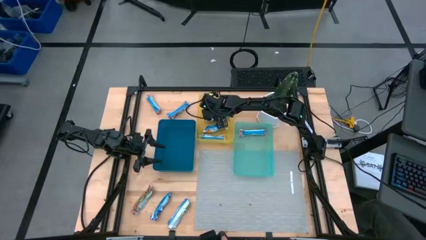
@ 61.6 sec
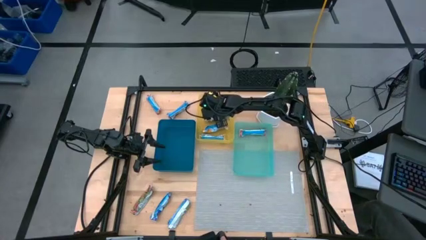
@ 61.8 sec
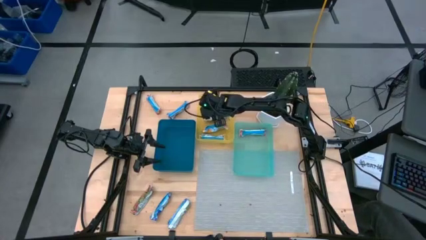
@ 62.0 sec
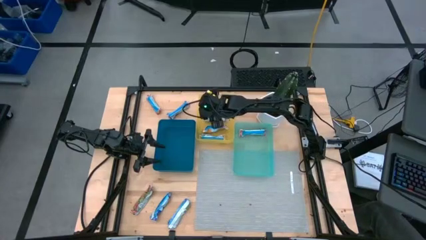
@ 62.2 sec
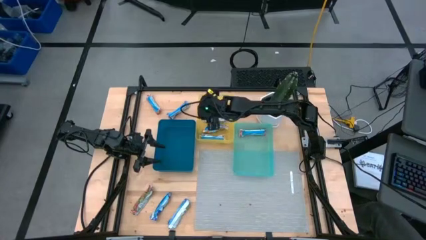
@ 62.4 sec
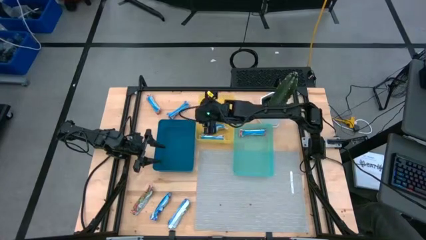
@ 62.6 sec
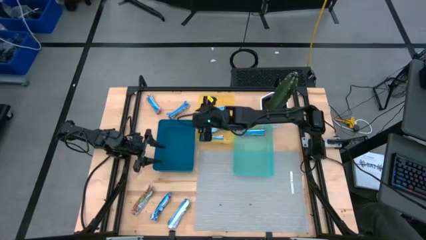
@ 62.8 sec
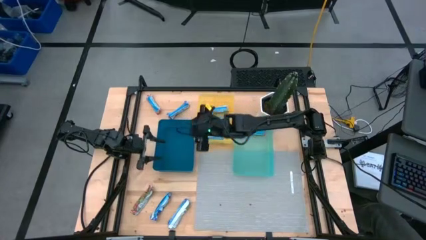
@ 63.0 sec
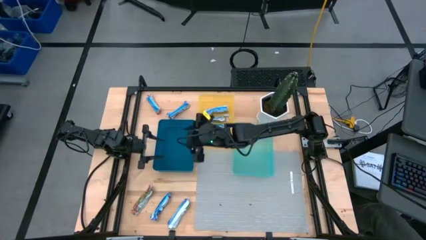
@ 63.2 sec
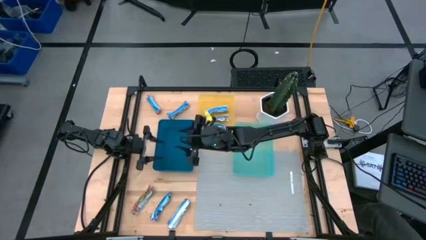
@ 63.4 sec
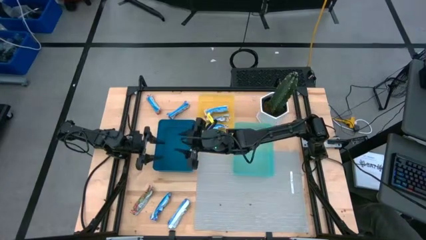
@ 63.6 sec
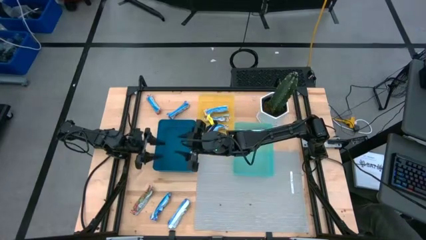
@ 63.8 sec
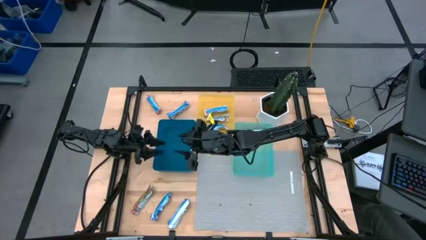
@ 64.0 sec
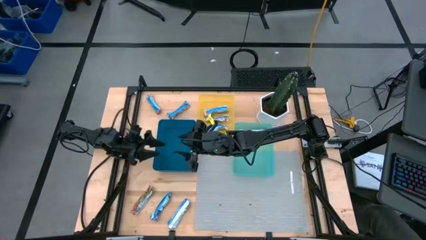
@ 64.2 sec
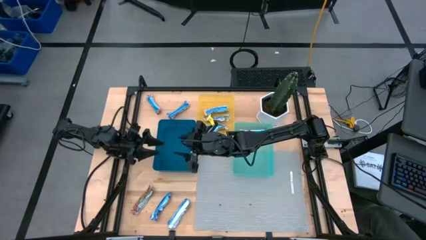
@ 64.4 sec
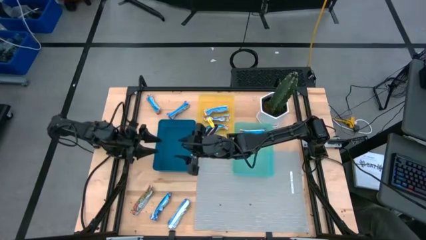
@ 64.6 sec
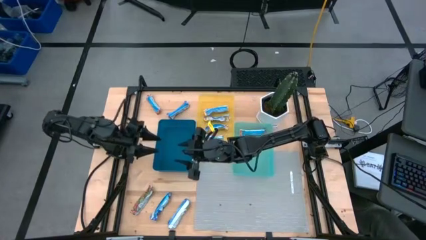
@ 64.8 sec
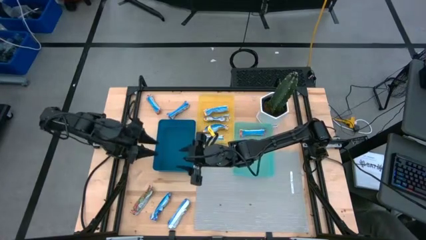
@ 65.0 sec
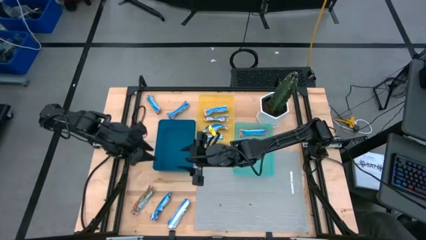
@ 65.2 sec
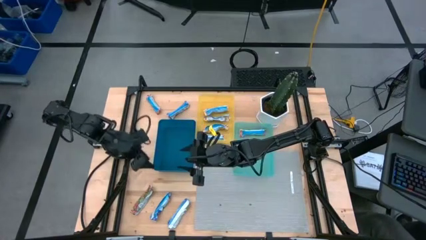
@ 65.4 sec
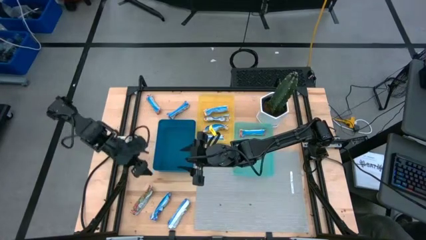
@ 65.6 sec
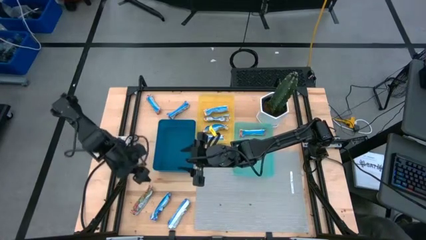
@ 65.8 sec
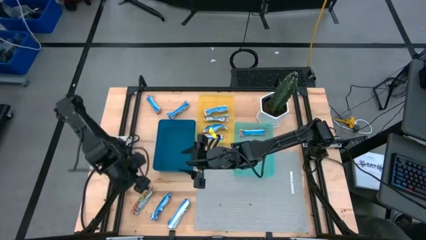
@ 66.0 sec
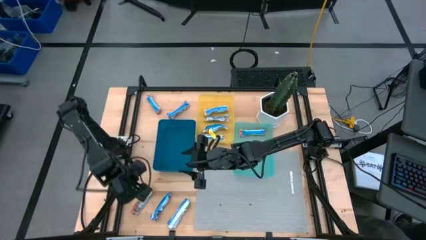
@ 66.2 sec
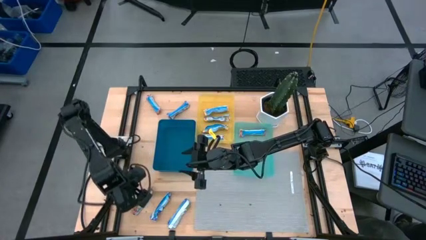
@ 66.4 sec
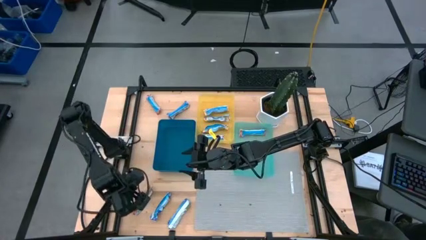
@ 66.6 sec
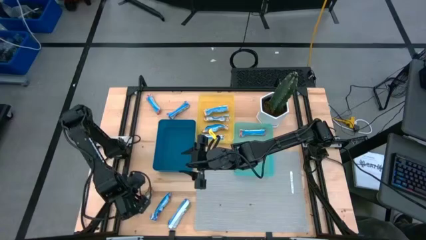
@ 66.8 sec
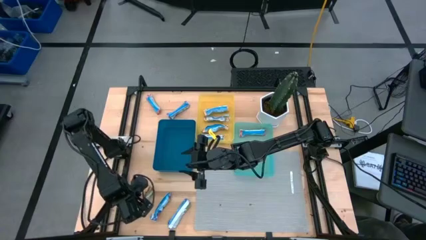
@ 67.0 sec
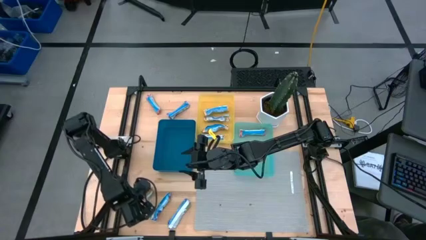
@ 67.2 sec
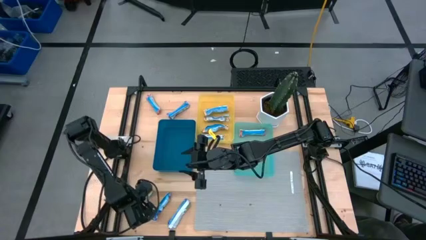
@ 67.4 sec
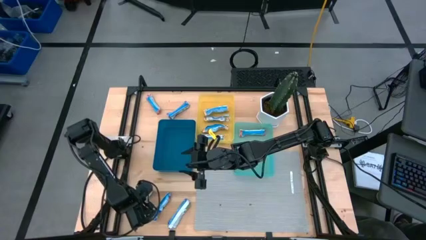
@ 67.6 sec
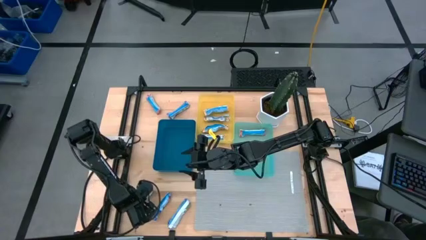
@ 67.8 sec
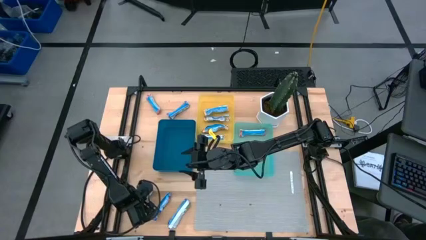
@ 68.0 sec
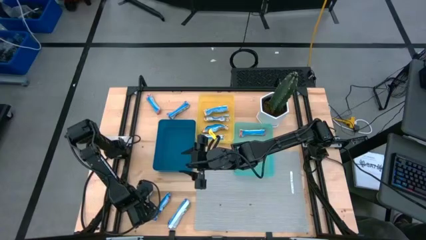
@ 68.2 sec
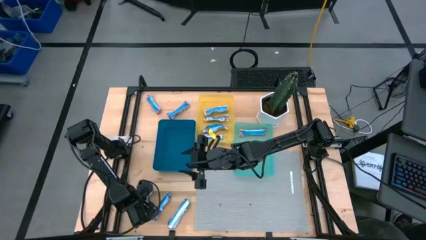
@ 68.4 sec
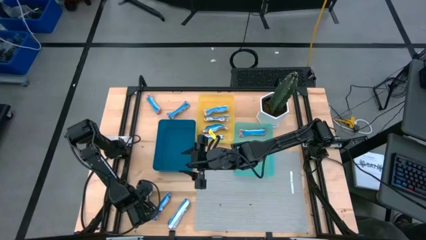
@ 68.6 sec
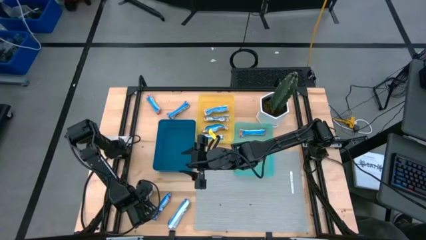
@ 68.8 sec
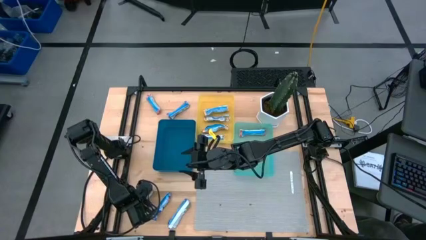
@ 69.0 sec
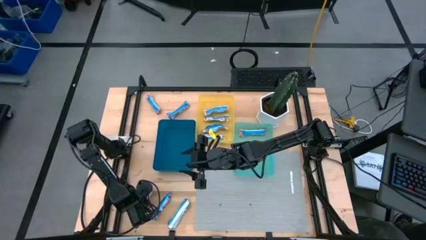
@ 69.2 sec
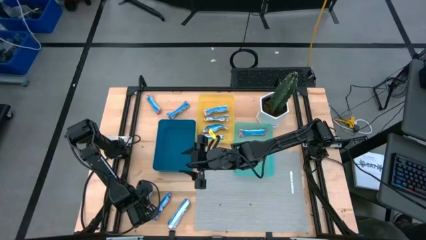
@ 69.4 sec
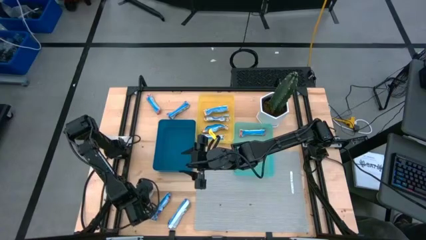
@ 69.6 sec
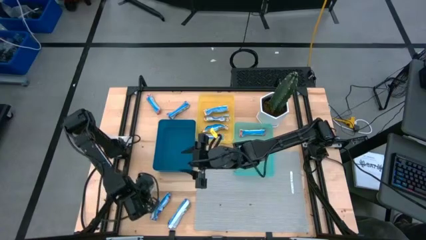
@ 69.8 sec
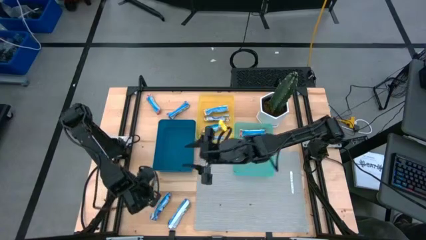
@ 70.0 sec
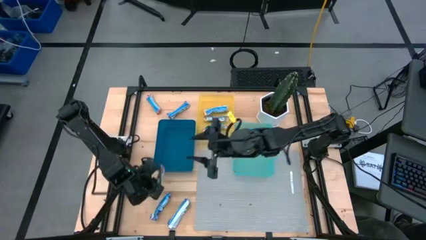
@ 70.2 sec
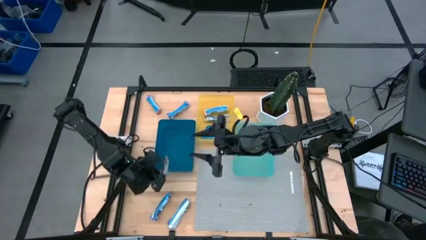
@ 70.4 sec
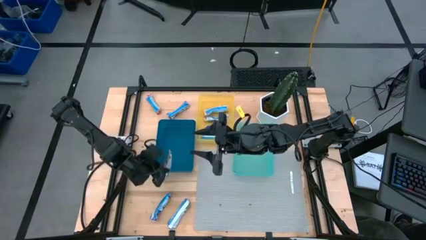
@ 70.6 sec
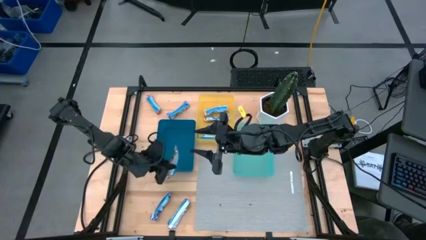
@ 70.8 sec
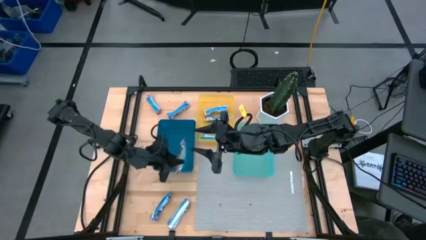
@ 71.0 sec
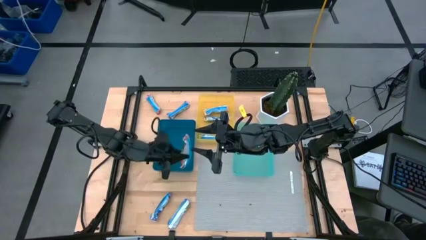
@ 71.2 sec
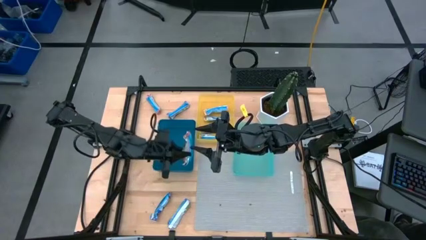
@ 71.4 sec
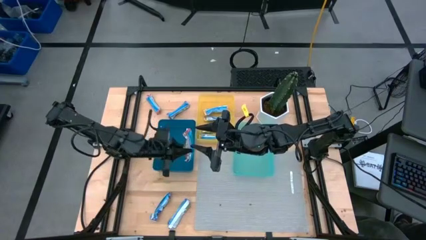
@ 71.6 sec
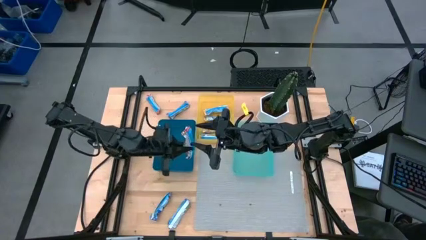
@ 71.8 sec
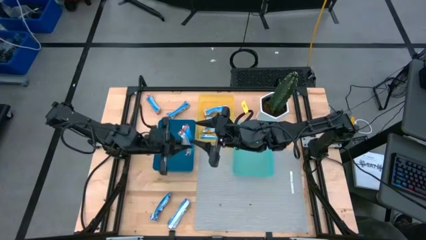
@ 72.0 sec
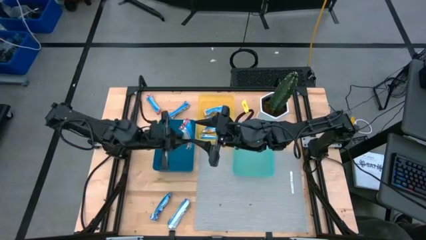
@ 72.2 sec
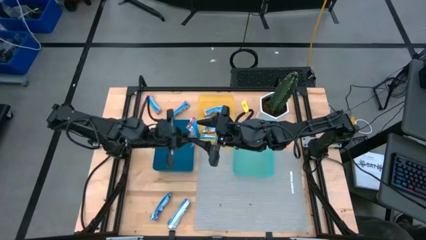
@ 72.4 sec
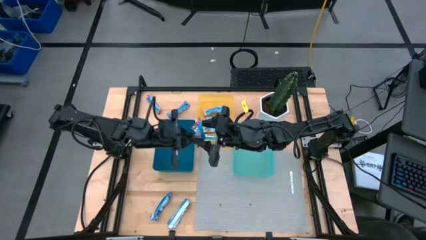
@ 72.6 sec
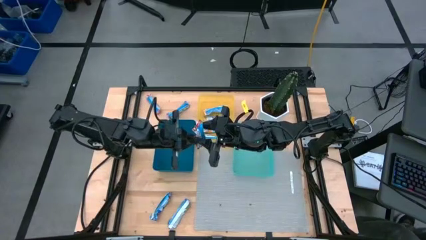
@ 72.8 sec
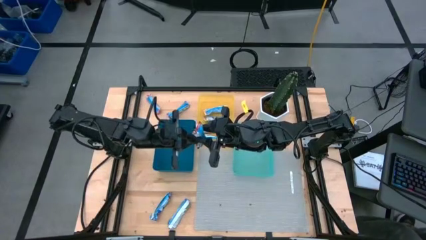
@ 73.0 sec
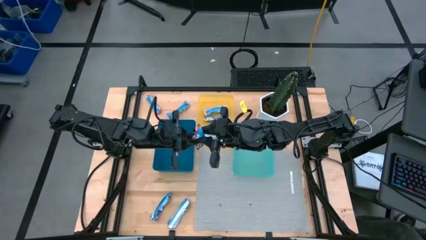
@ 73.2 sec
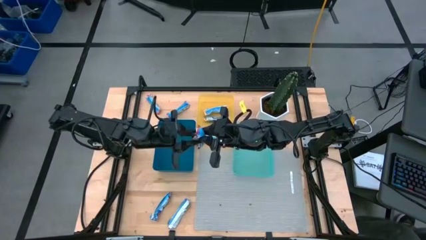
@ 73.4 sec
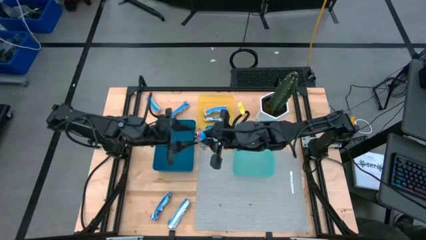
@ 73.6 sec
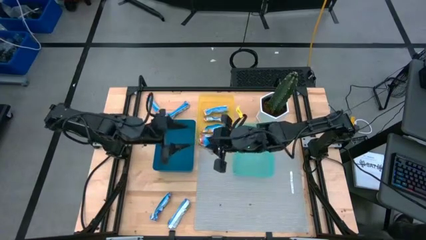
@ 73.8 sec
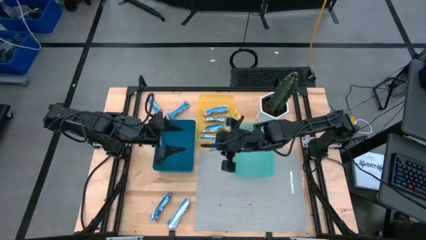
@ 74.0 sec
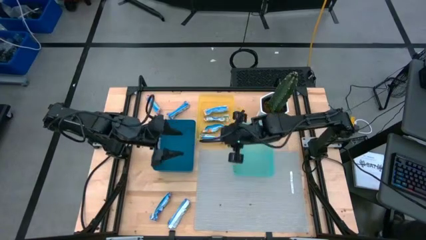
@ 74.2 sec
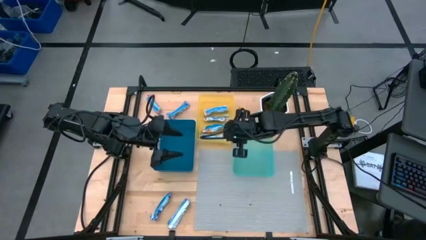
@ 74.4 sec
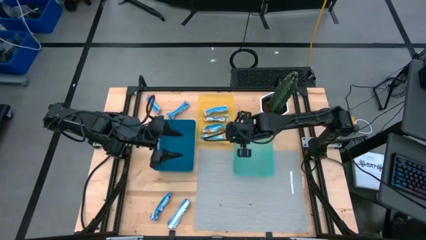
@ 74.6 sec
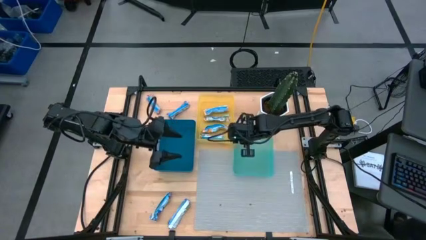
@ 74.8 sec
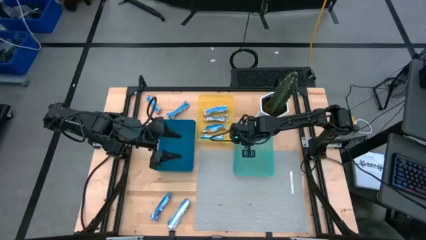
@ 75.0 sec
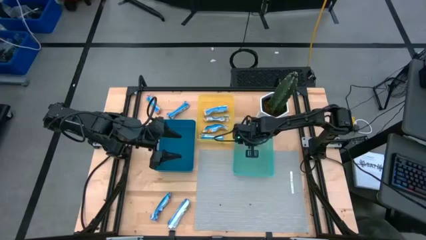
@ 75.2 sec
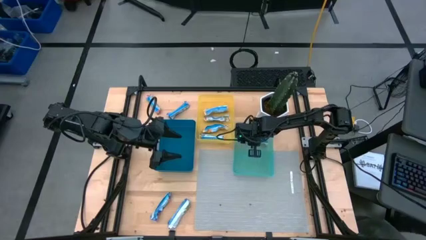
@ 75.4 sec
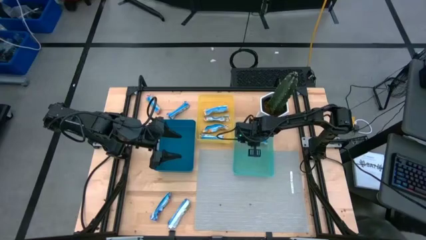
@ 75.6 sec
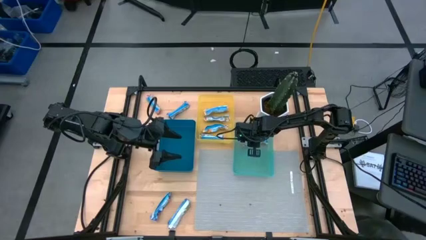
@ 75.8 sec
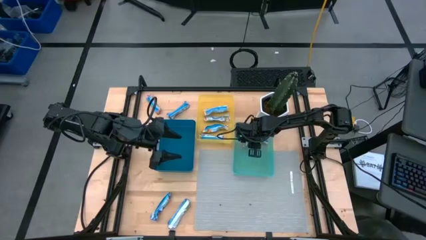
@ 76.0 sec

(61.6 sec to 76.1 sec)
Task: Pick and place Granola Bars by type
Put the red granola bar into the green bin

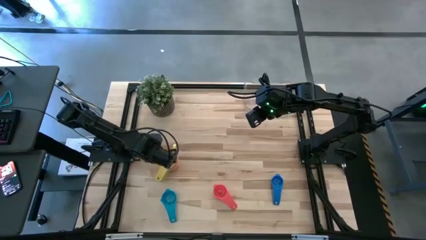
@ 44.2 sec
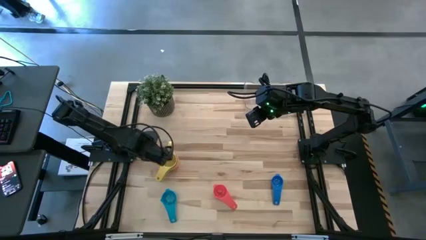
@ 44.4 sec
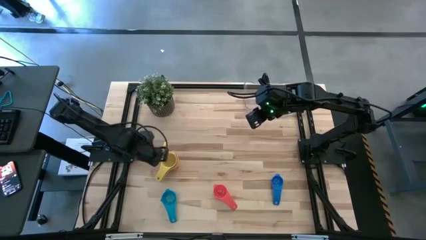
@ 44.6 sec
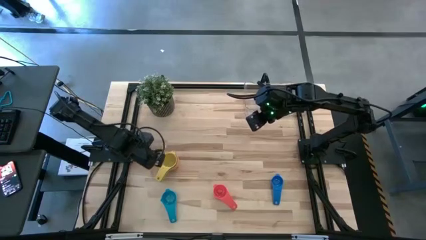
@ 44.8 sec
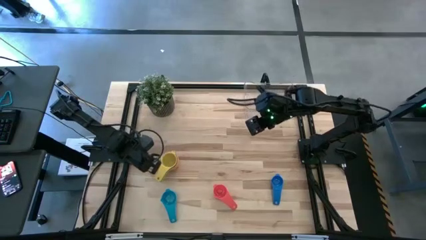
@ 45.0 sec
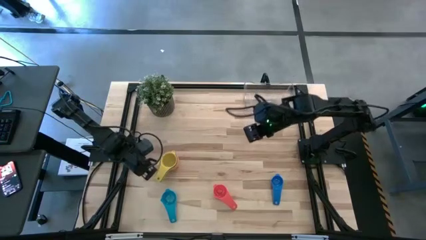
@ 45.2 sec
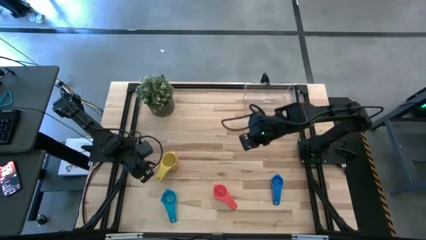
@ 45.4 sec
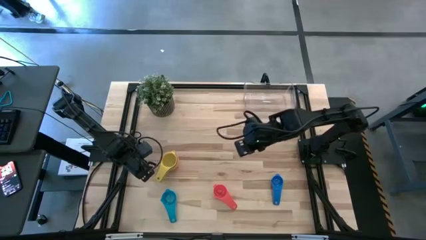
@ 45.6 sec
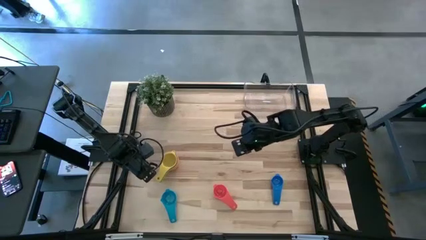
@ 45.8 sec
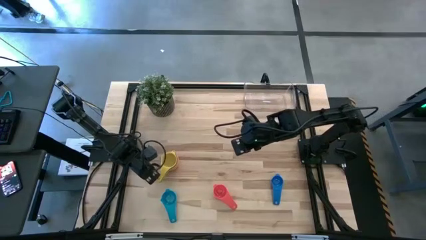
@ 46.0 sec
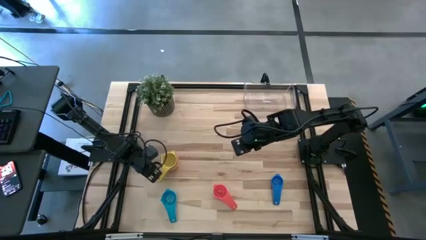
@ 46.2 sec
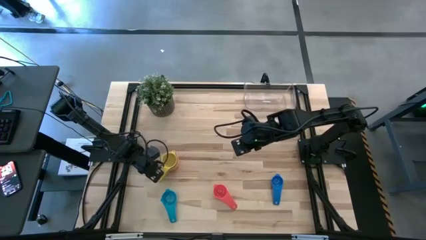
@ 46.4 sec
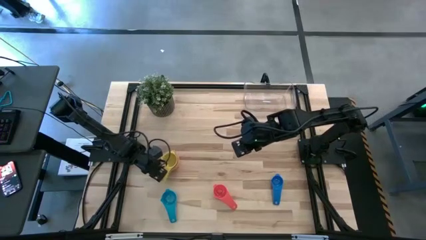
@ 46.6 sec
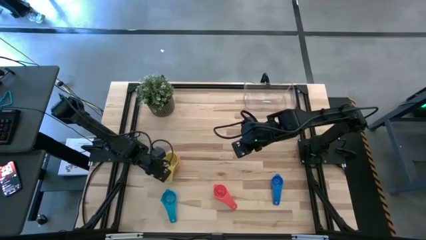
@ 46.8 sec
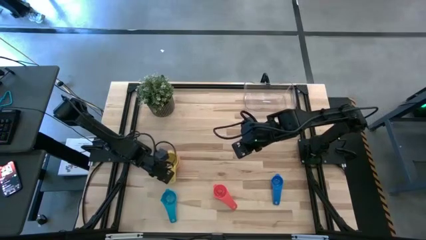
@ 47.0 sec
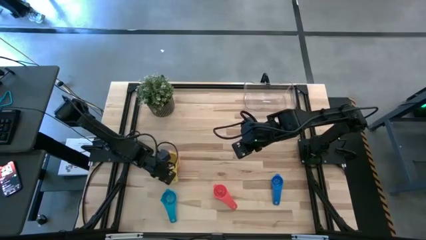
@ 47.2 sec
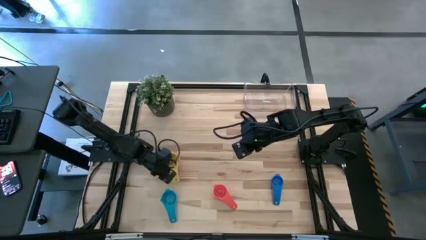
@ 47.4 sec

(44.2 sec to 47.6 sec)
Task: Nest measuring cups in basket
Adjust the nested measuring cups
